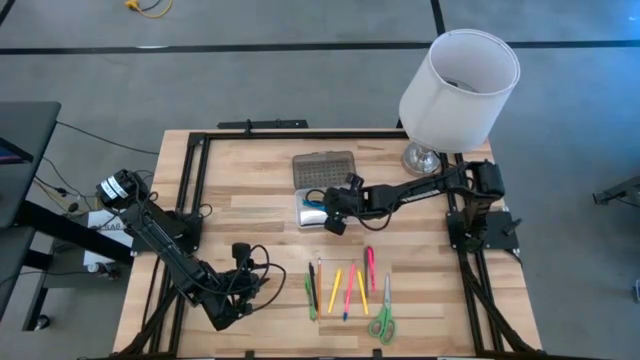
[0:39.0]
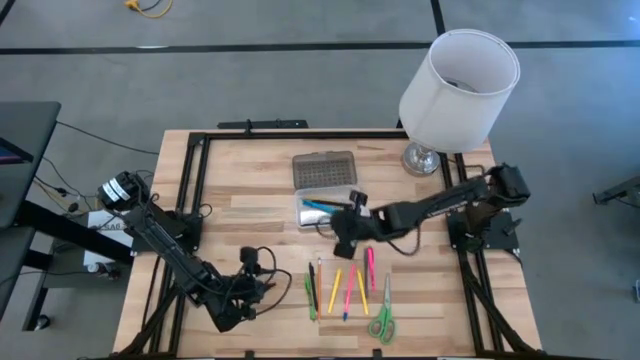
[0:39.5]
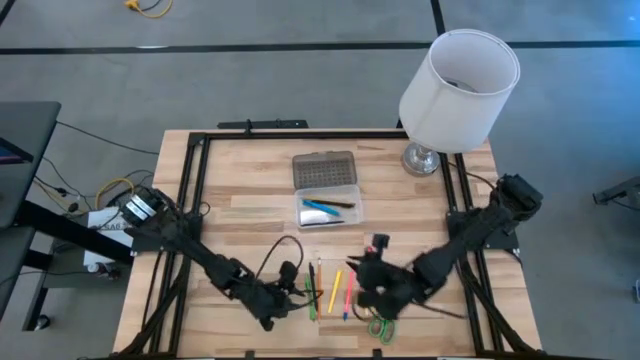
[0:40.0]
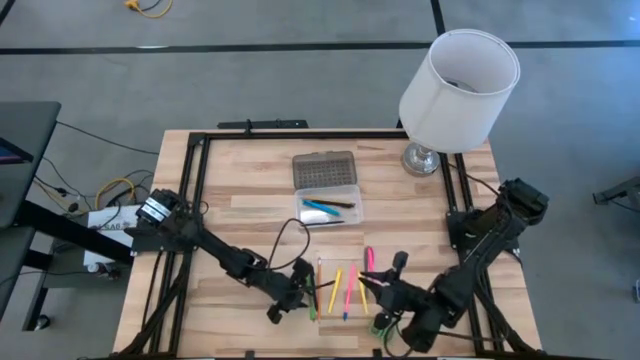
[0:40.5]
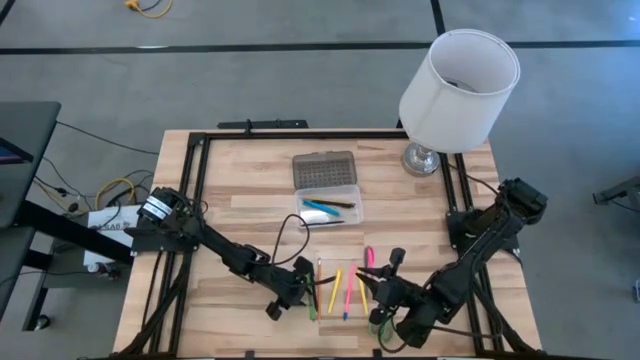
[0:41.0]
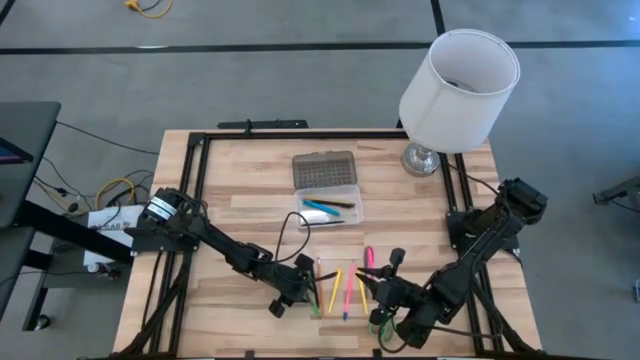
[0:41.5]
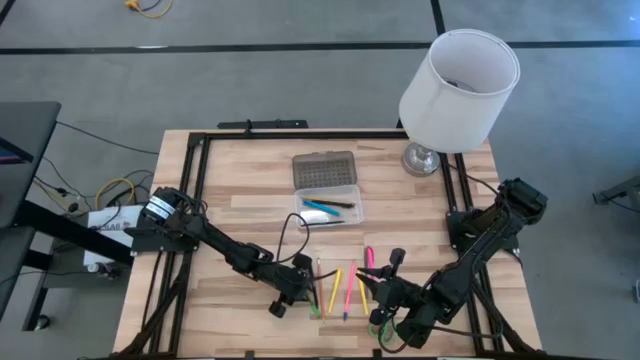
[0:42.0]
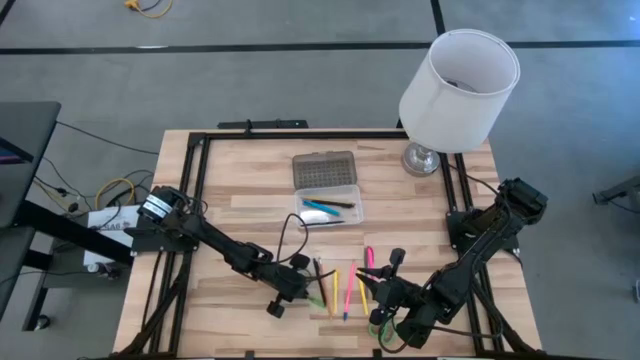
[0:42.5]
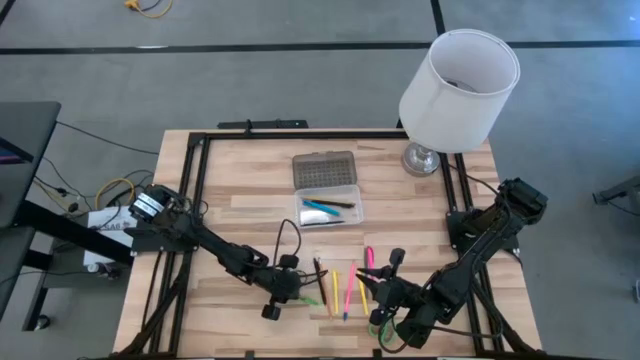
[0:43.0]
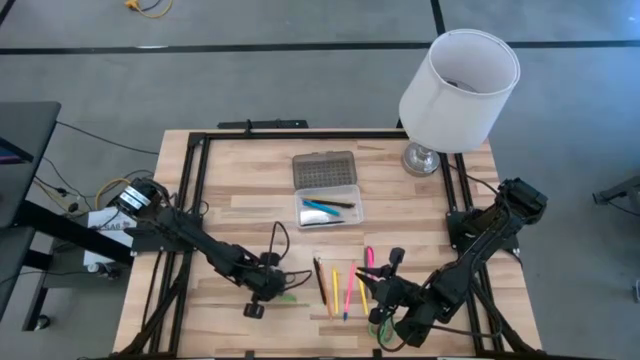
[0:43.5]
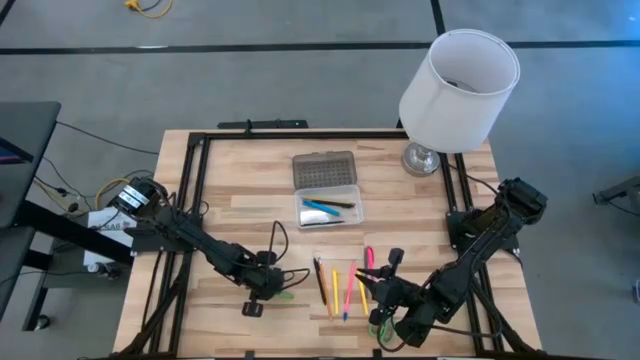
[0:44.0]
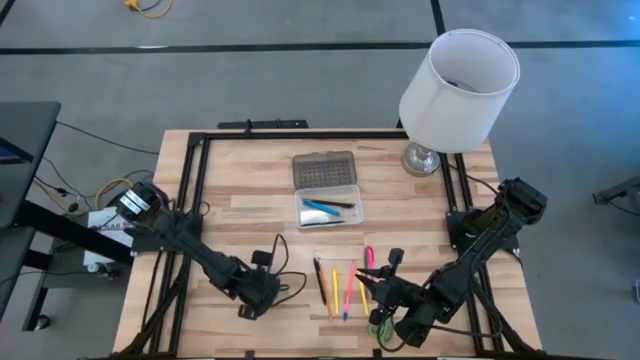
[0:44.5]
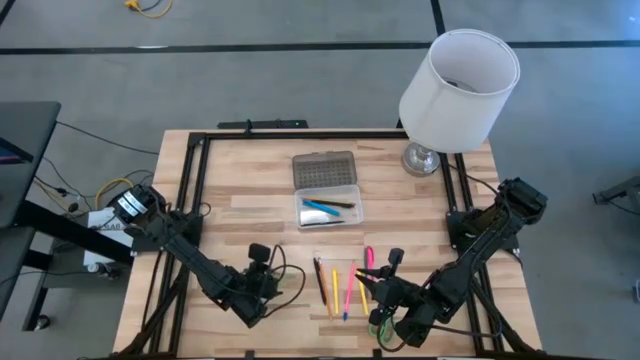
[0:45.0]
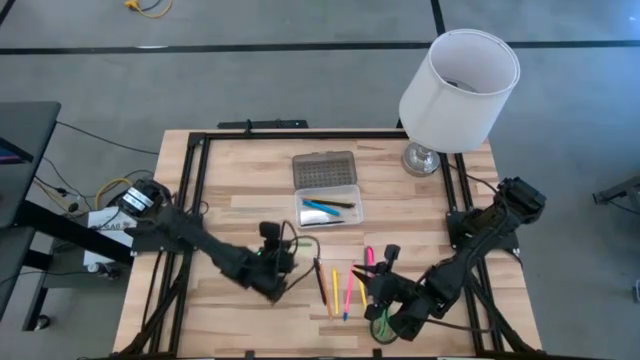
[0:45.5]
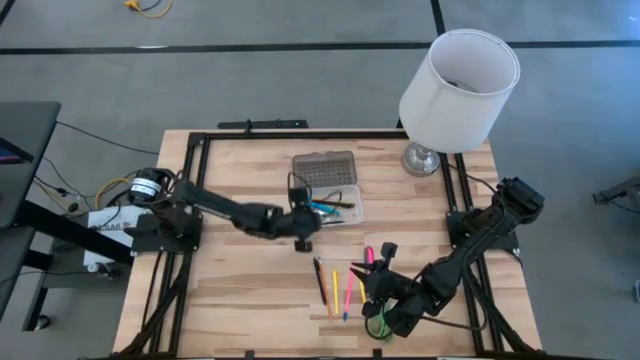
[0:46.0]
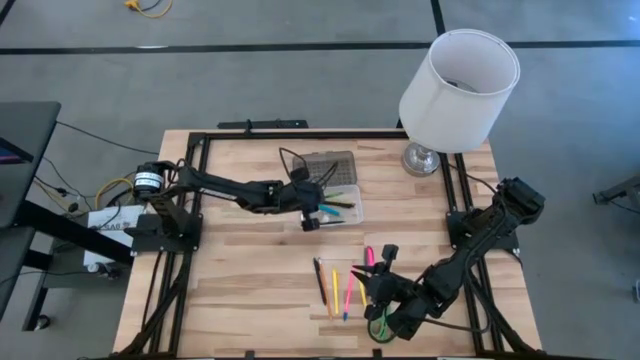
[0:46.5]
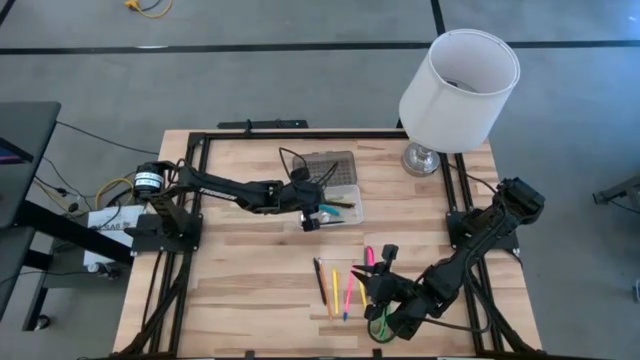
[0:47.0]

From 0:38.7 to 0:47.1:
Task: Pick & place school supplies into a supply box
Put the green pen into the gray supply box

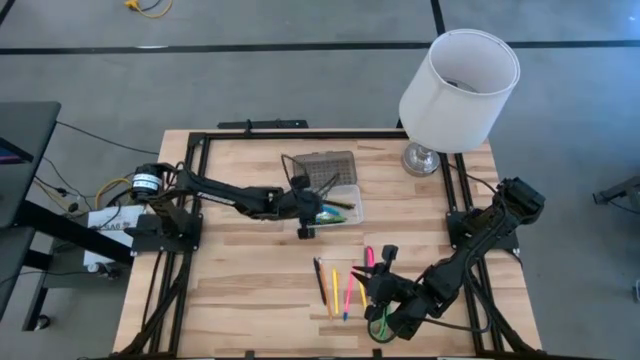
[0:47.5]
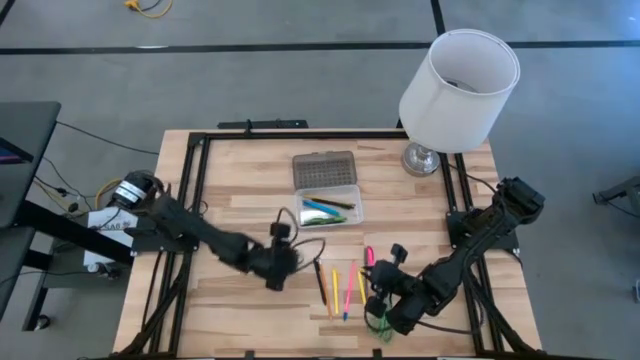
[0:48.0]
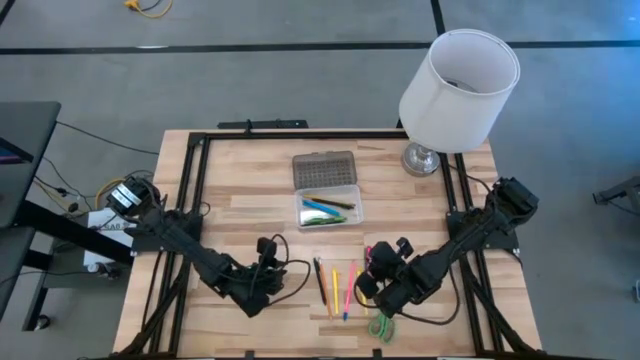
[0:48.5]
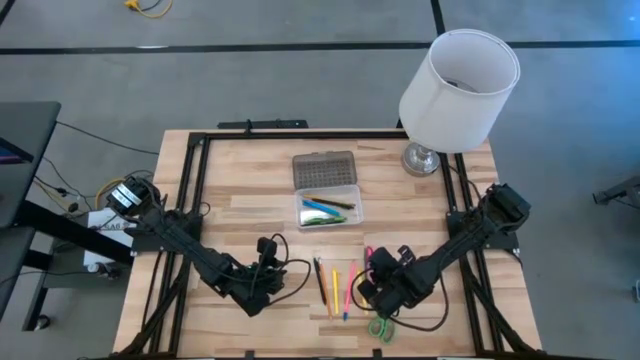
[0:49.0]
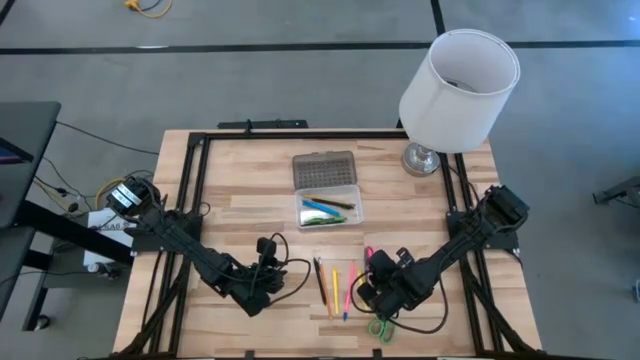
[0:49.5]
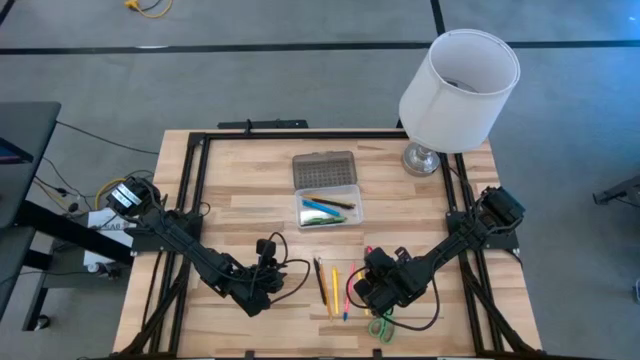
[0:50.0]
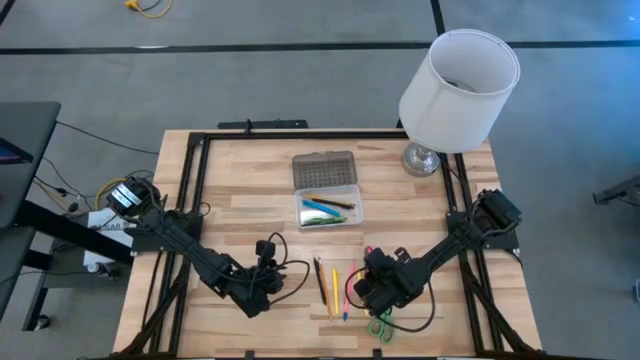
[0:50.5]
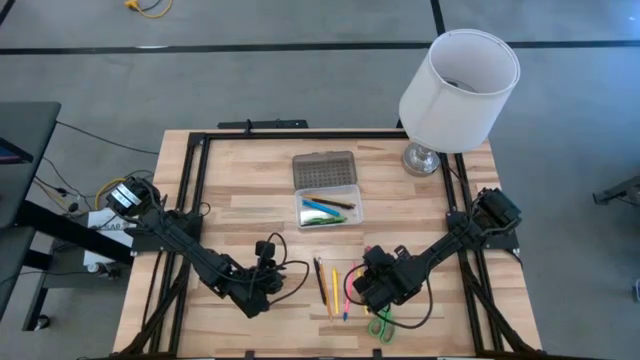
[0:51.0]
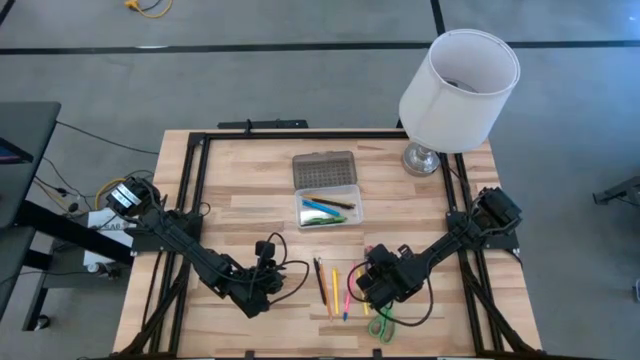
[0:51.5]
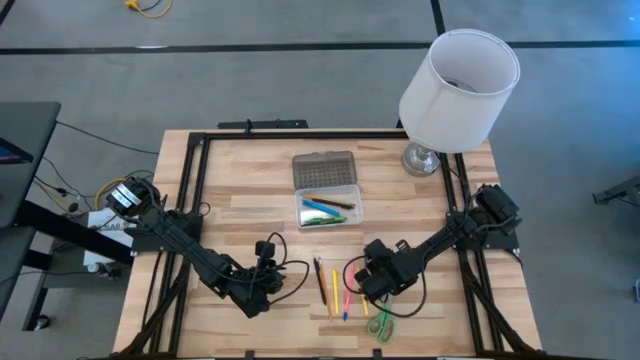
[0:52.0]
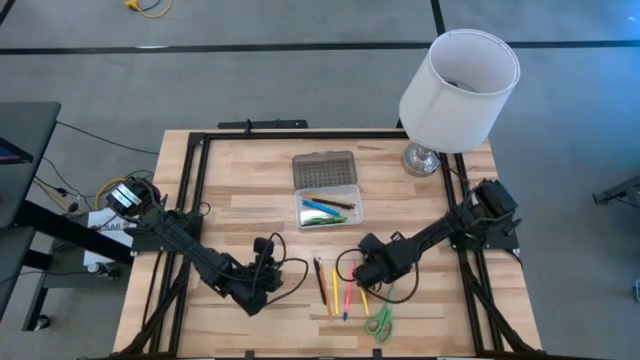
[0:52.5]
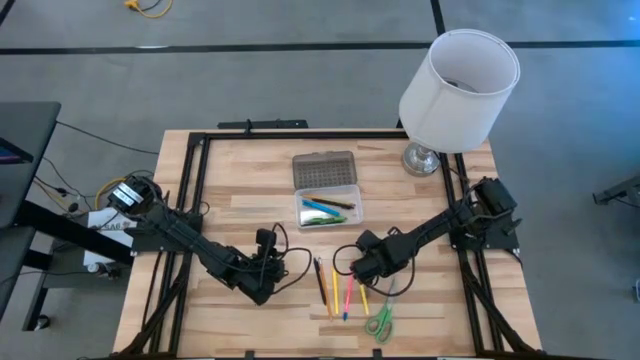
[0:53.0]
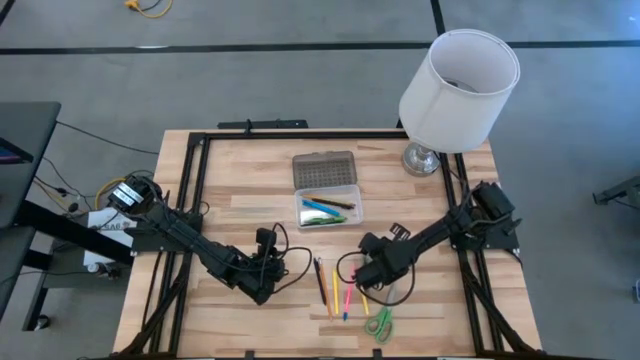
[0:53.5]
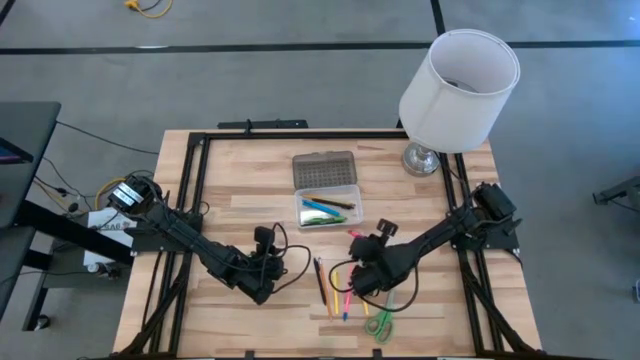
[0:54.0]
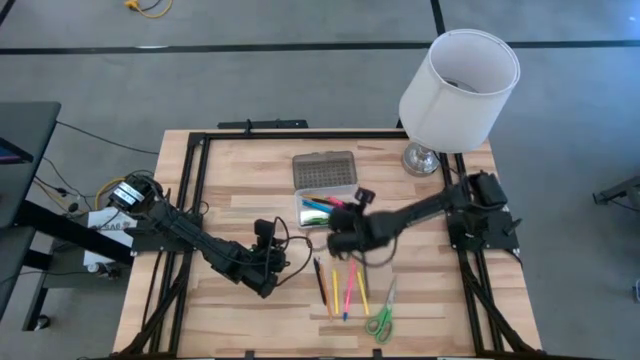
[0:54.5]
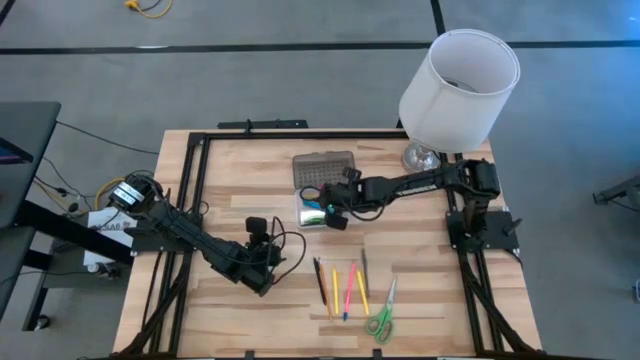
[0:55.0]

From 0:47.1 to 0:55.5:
Put the pink pen into the gray supply box

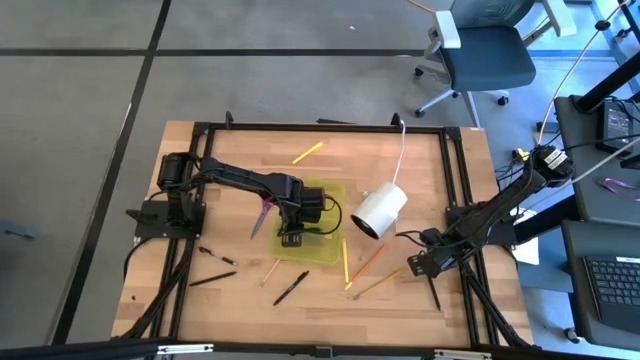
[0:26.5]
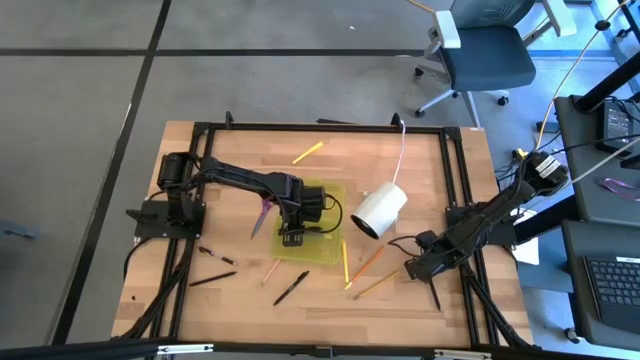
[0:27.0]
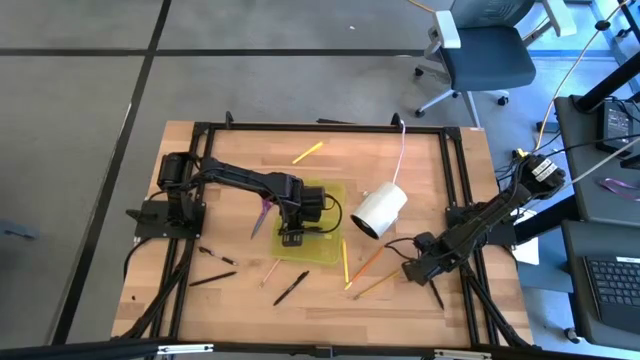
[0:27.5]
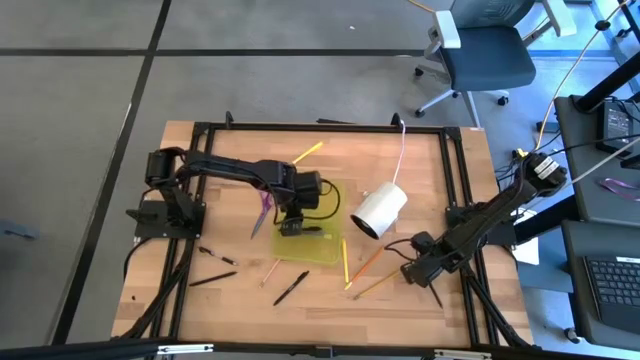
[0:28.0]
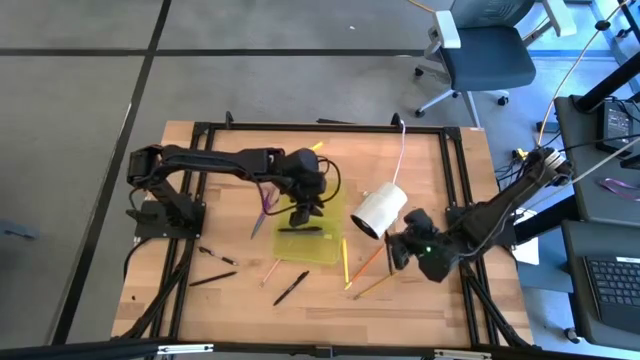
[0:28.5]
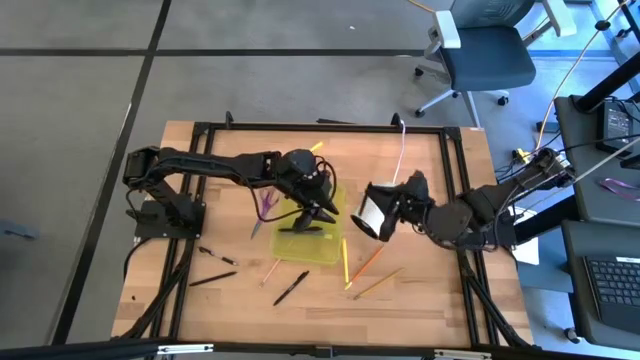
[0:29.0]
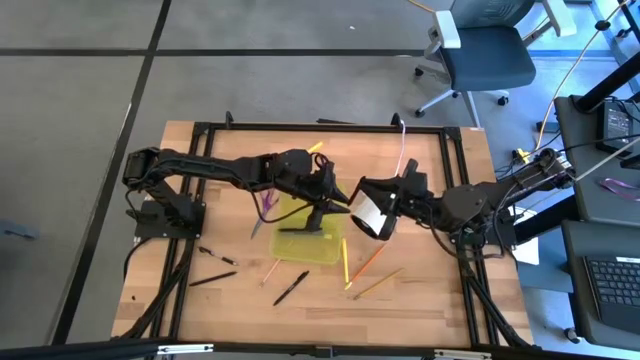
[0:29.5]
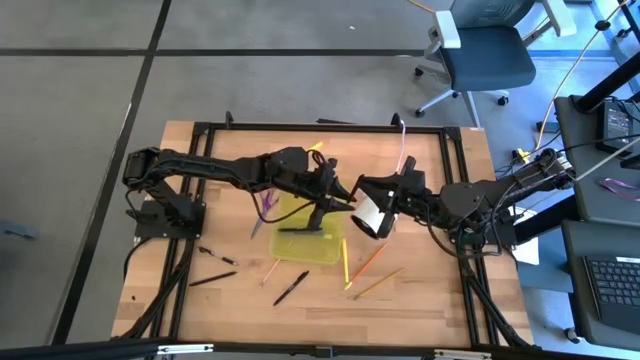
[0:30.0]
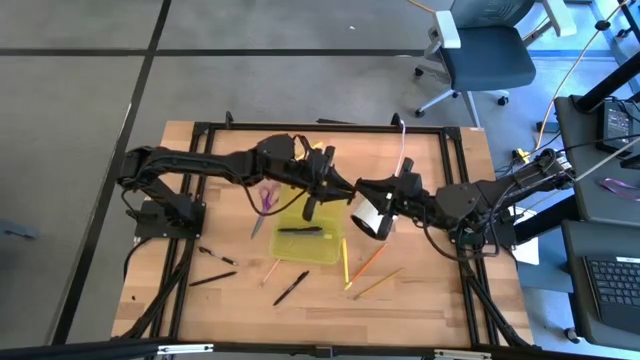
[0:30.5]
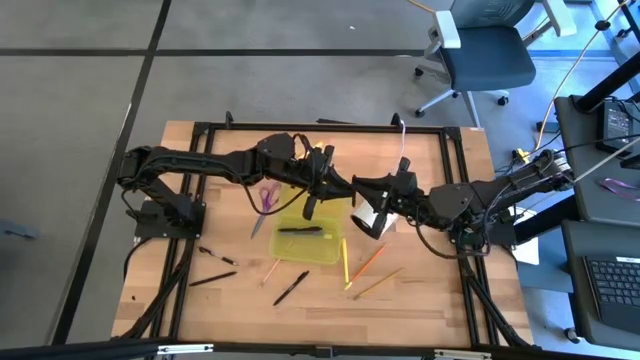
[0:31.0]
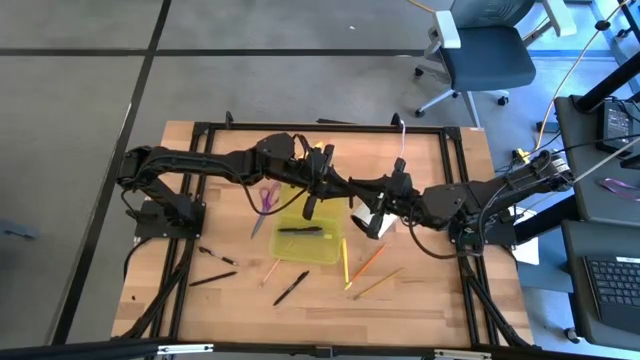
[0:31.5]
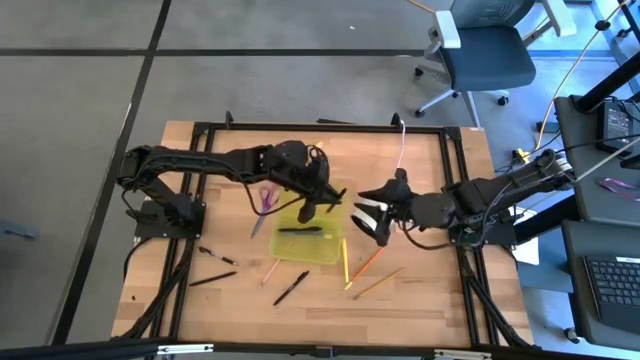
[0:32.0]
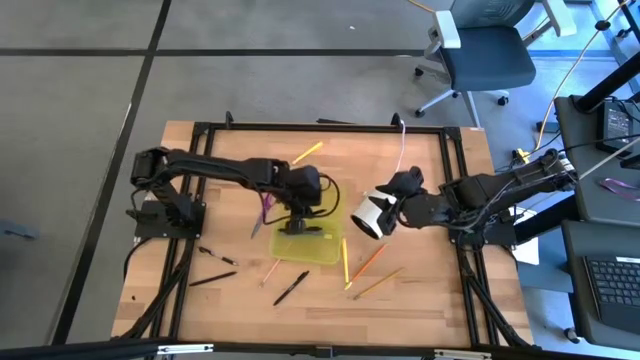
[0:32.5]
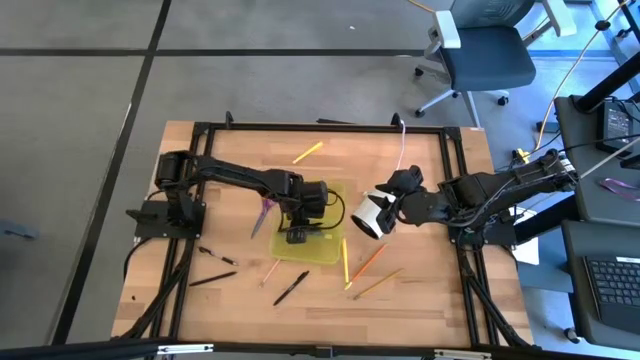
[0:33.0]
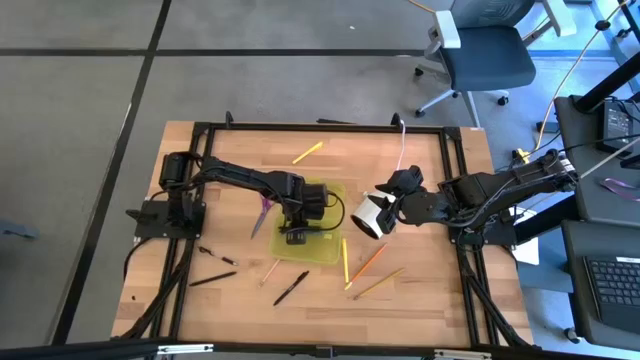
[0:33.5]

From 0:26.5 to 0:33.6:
Task: Pick & place school supplies into a supply box
Put the black pen into the yellow supply box
